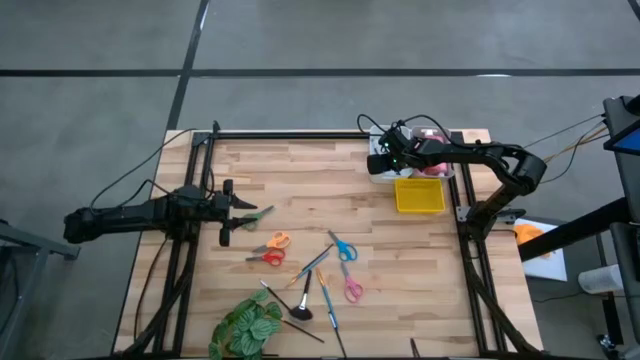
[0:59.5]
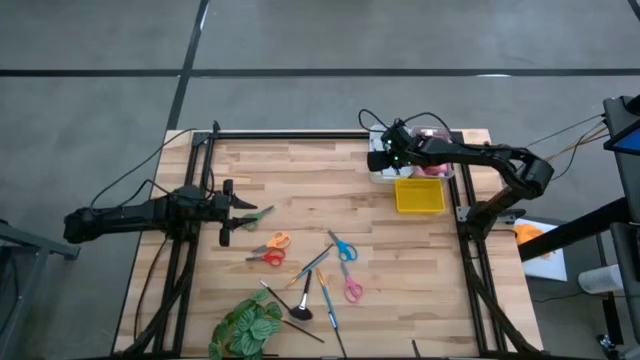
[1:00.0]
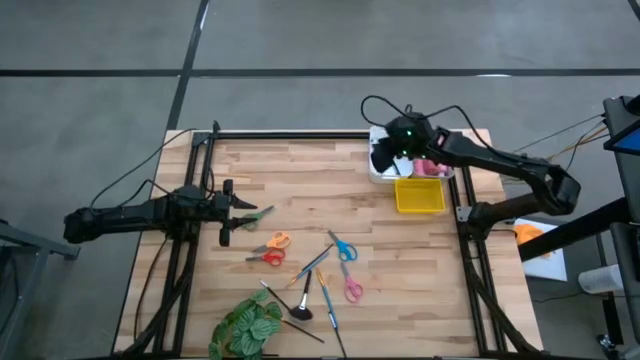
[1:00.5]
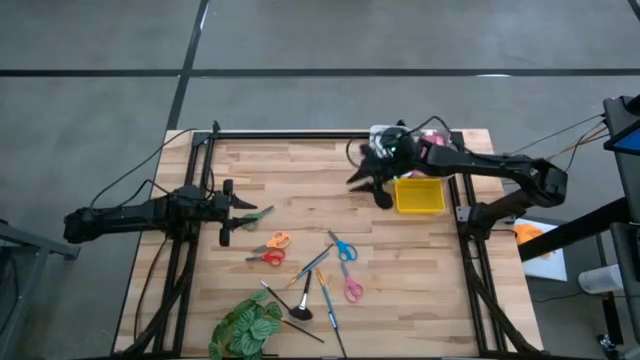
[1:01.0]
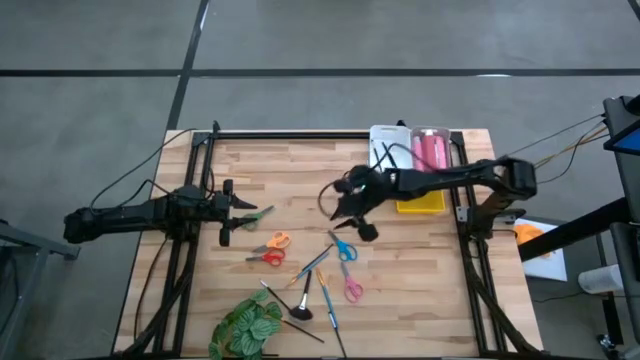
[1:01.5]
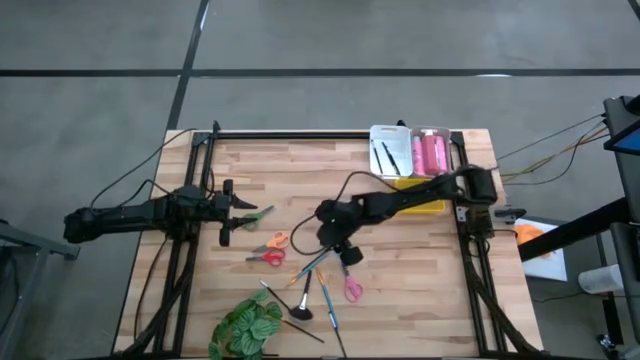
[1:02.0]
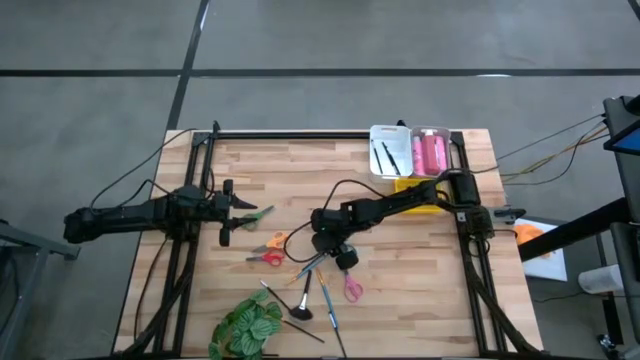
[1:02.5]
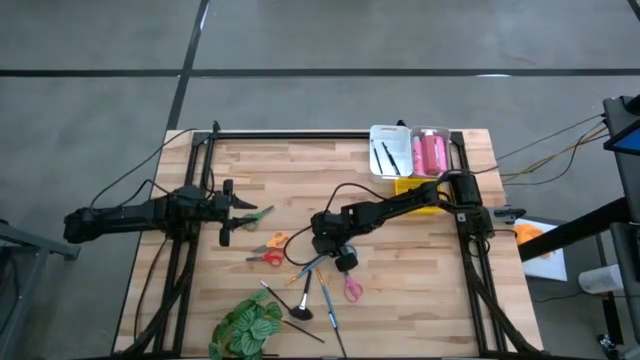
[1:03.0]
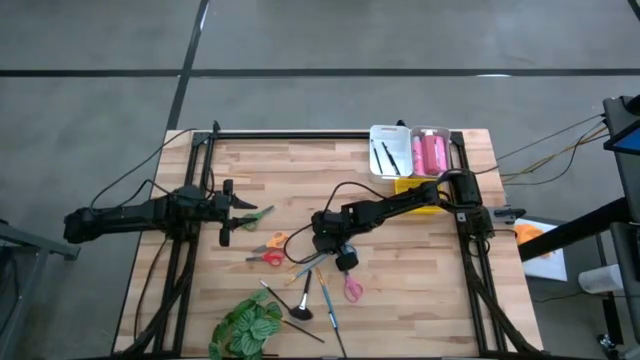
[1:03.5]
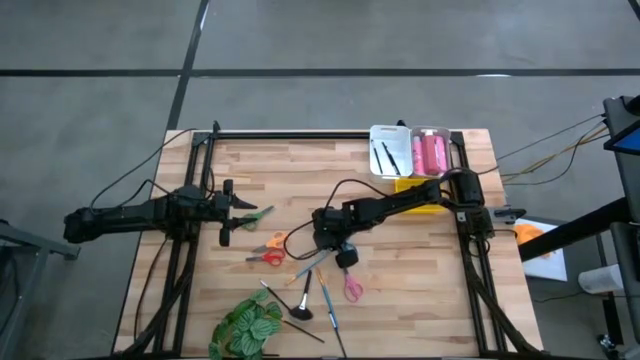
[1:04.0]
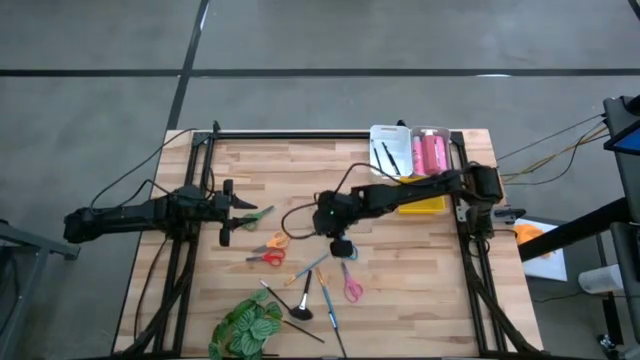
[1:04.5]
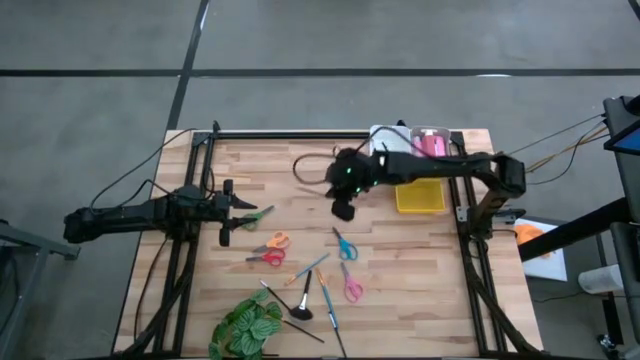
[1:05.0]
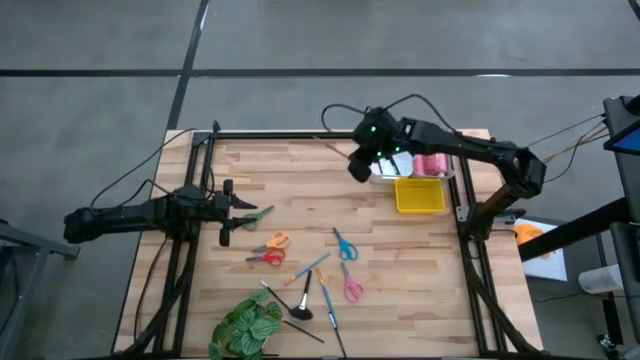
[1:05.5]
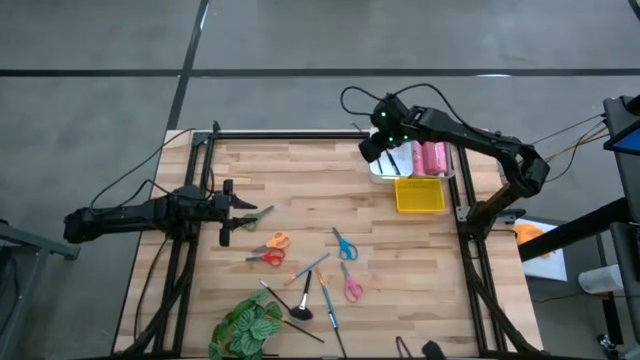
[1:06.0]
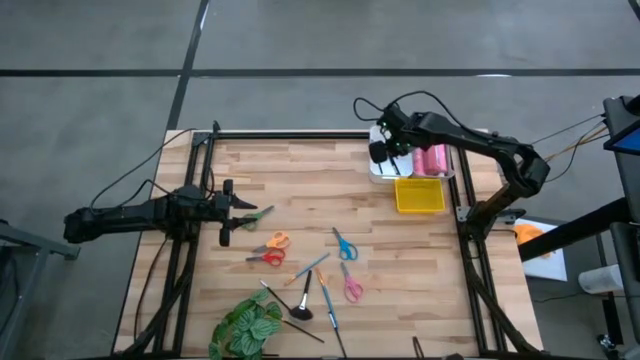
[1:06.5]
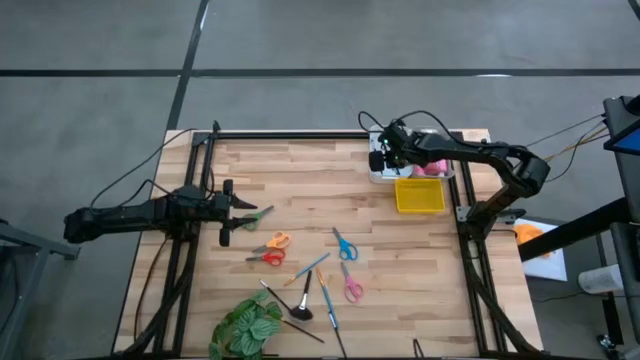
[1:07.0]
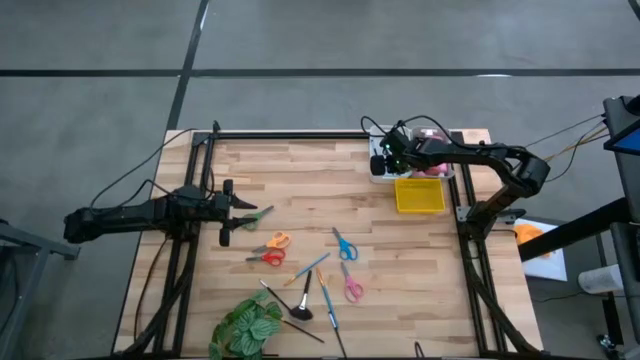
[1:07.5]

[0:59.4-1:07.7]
Task: Pick & Place Paint Supplies
Put the black paint brush into the white bin

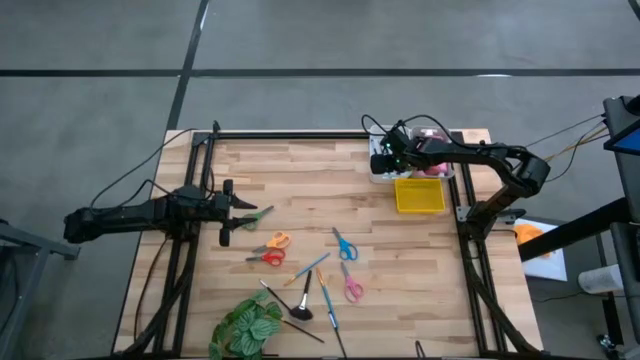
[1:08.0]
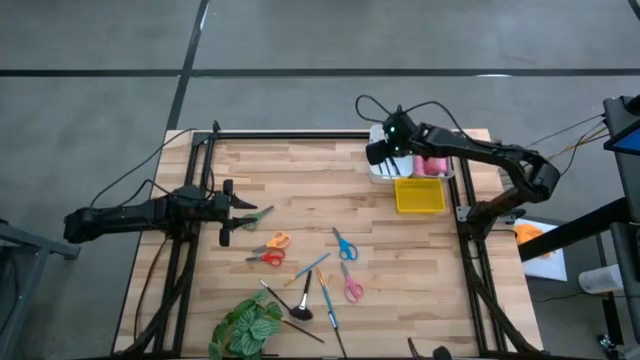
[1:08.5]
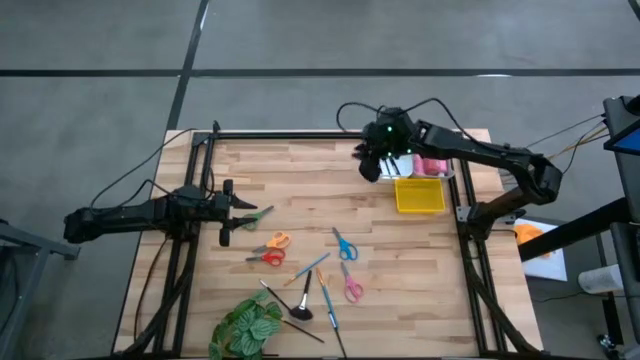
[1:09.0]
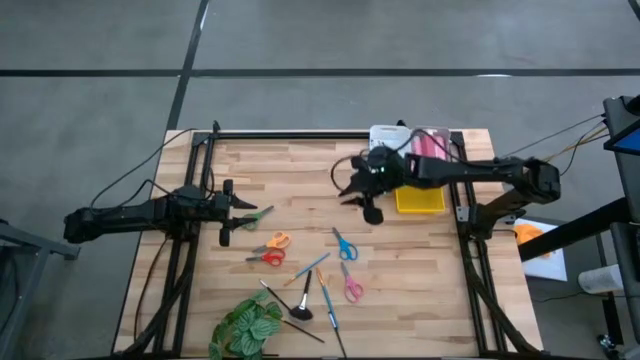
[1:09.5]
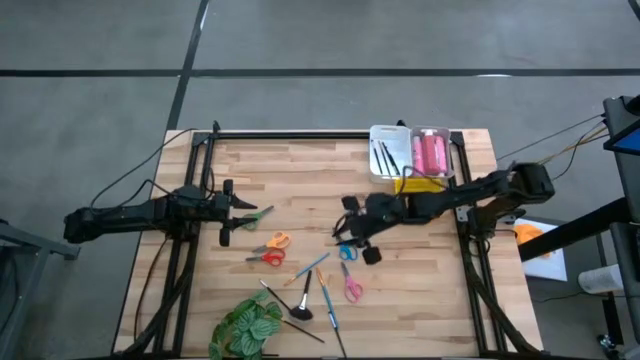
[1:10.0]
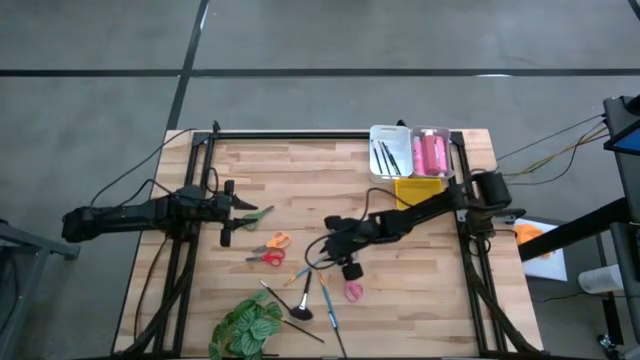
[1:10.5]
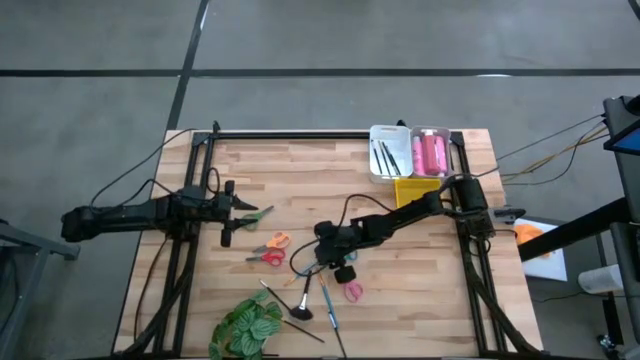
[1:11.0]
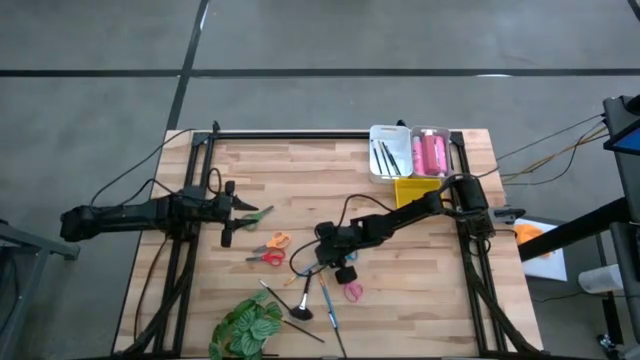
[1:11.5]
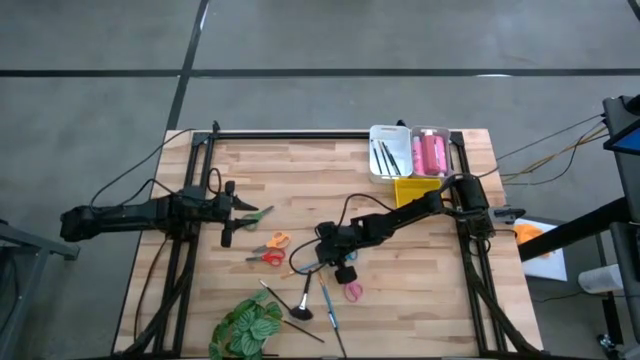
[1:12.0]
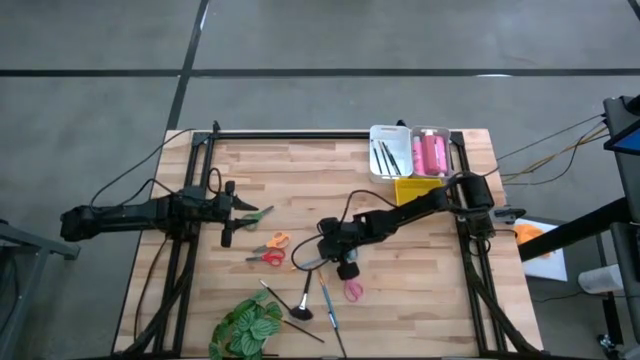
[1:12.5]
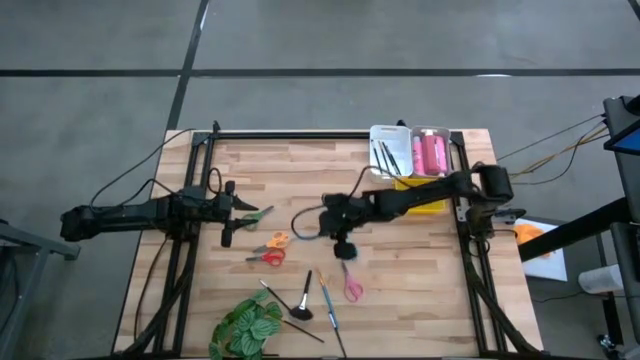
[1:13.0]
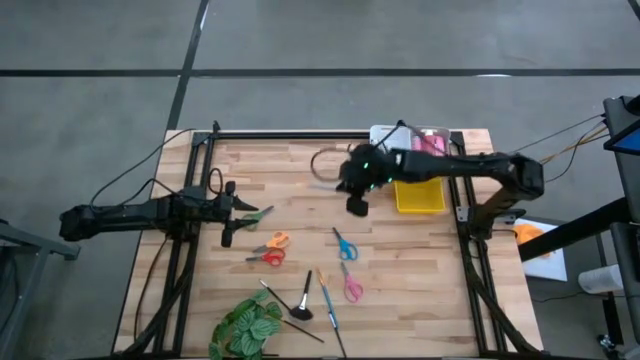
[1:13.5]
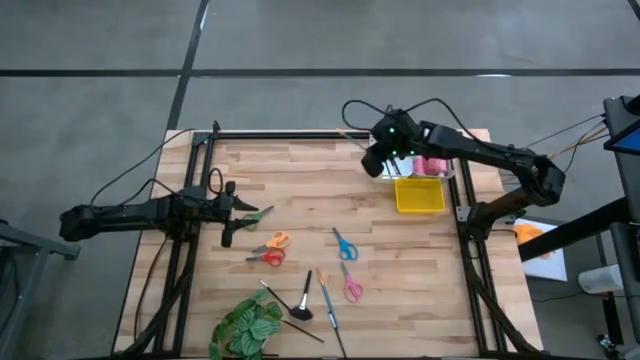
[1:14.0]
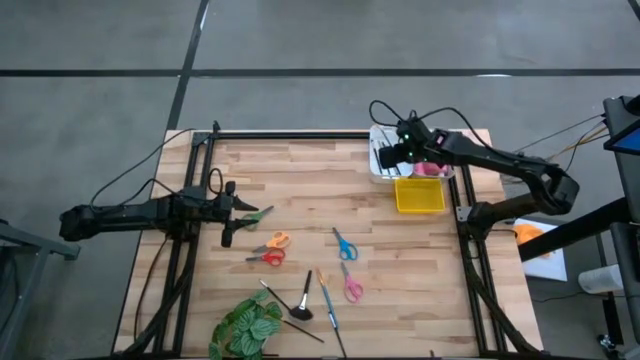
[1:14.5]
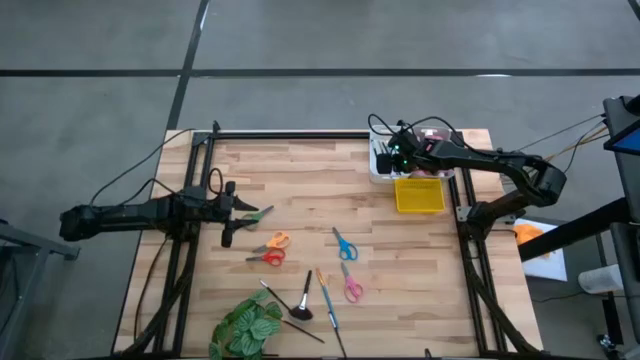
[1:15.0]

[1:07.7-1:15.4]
Put the blue paint brush into the white bin

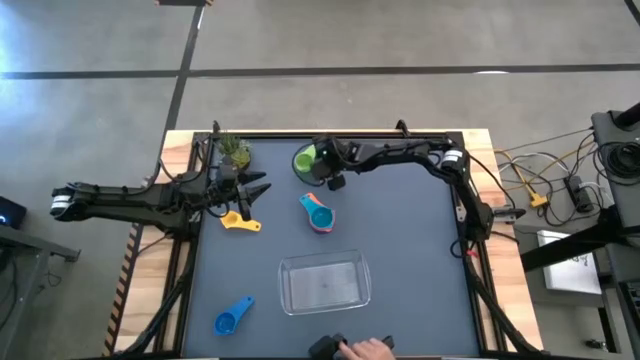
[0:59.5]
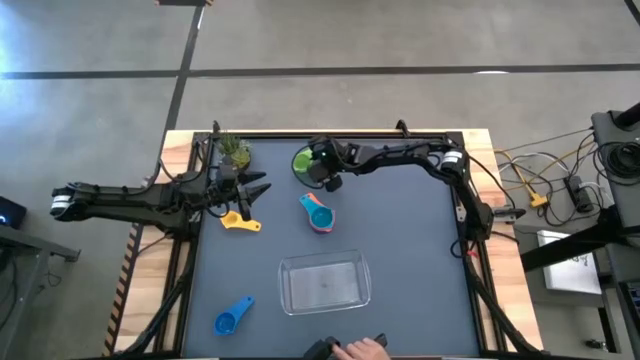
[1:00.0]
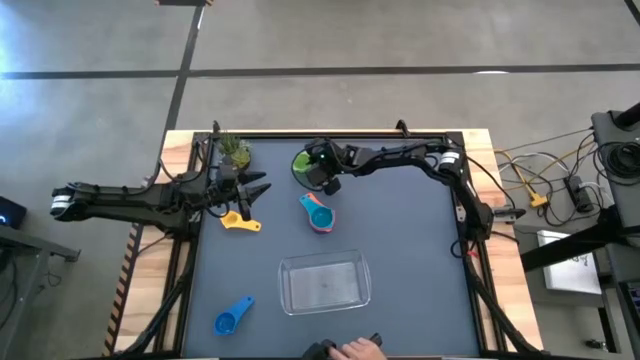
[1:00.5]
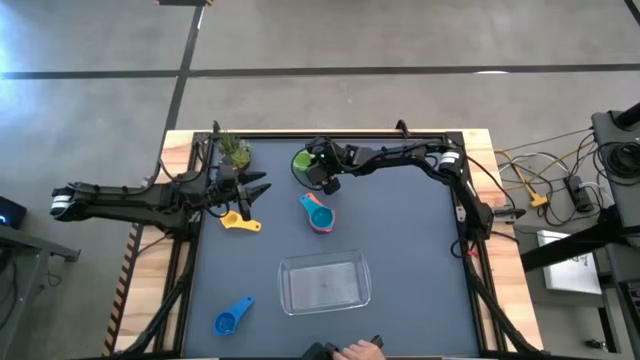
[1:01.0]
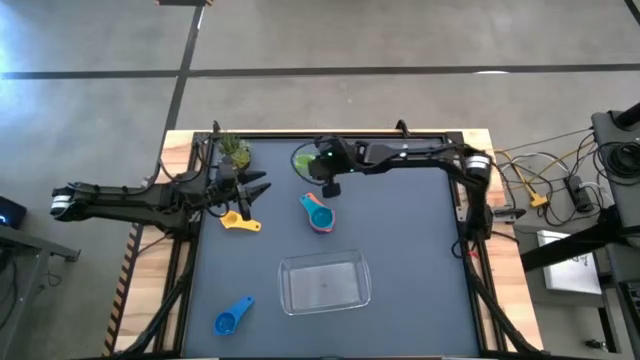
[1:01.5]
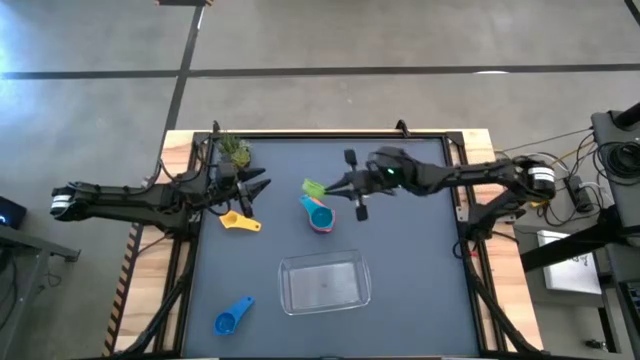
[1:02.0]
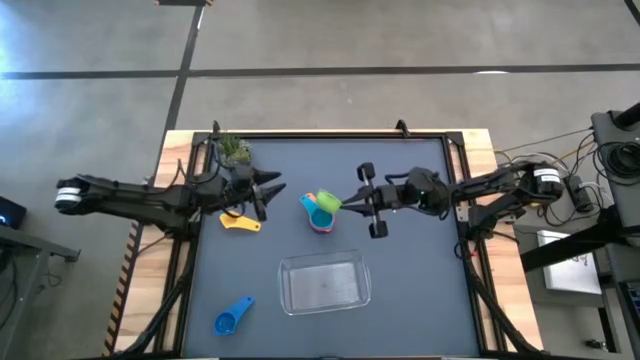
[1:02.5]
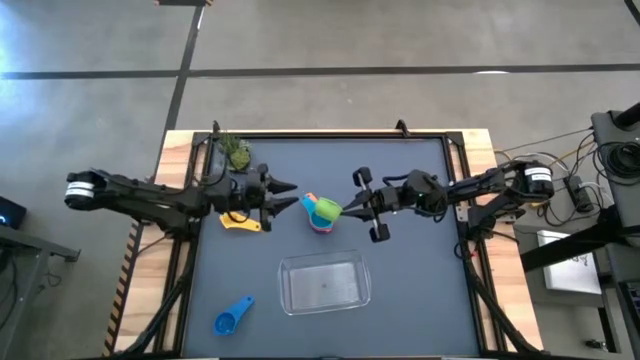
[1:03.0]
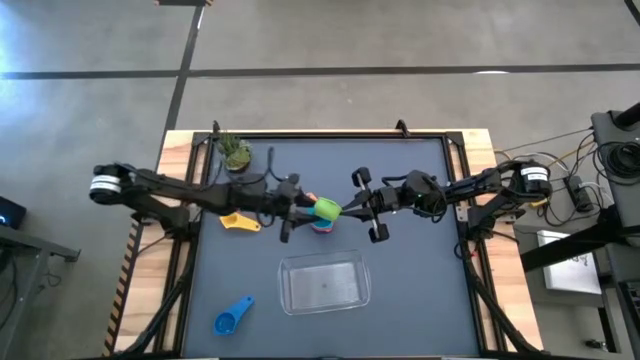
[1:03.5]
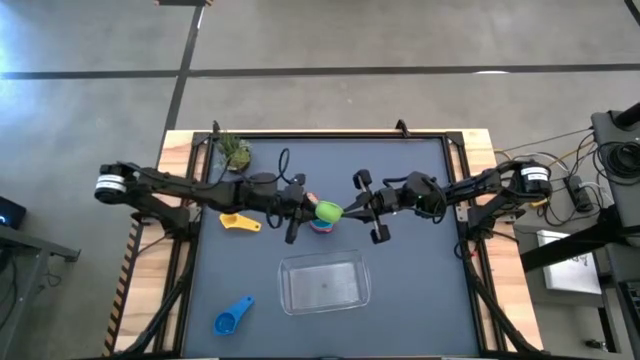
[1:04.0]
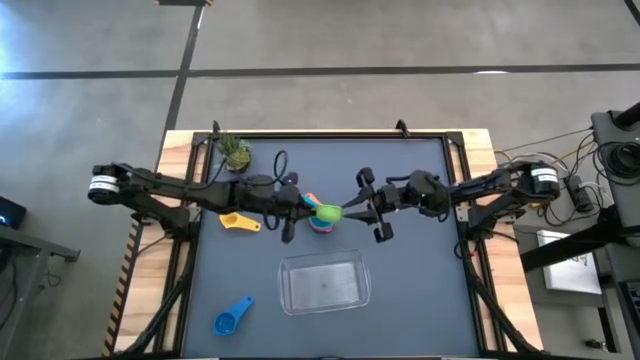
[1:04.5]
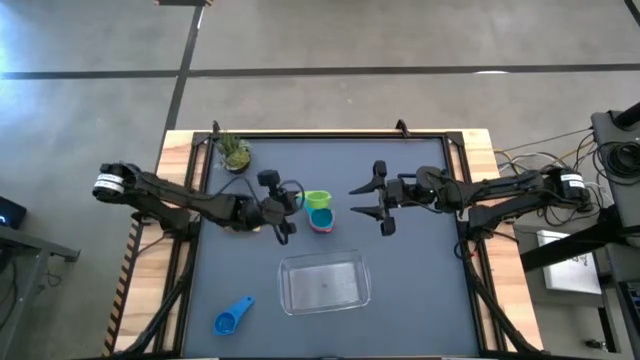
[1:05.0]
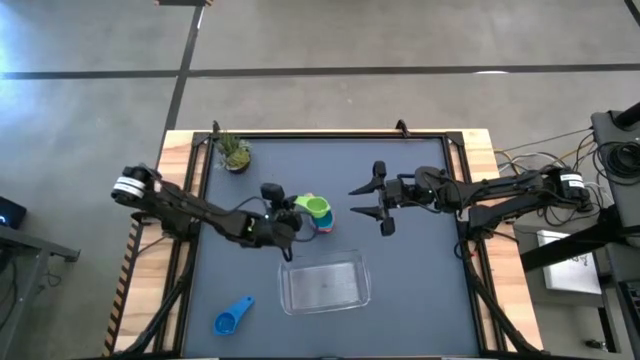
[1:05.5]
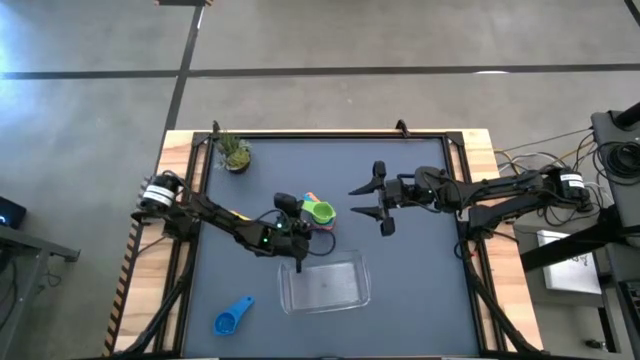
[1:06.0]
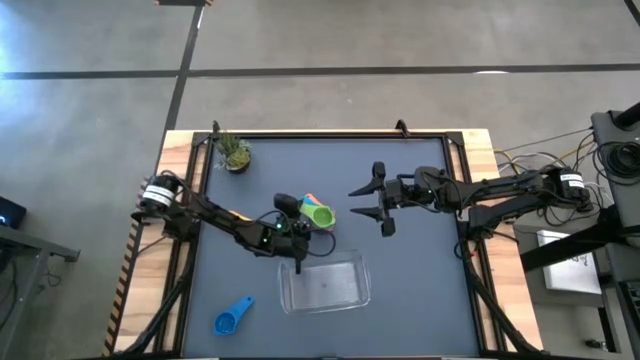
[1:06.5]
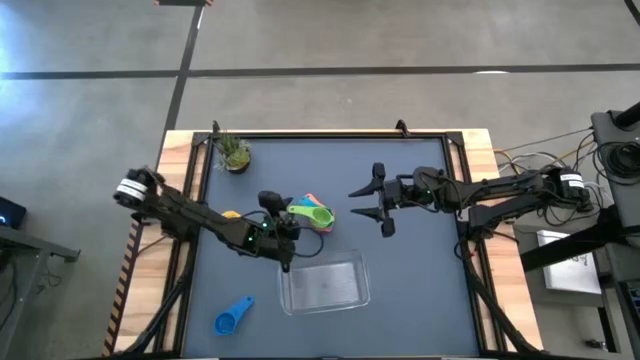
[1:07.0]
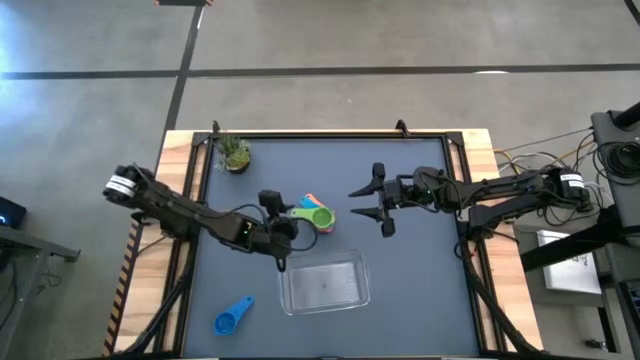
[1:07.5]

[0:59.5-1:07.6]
Task: Nest measuring cups in basket
Stack the green measuring cup on top of the light blue measuring cup
